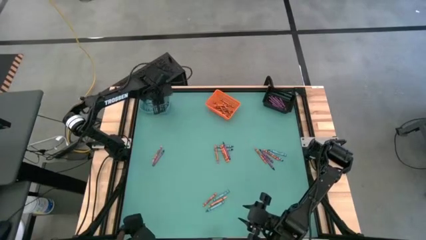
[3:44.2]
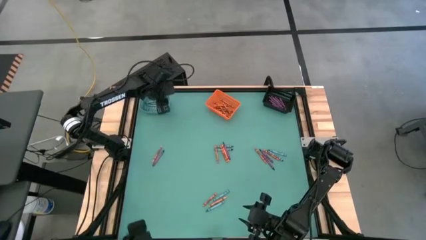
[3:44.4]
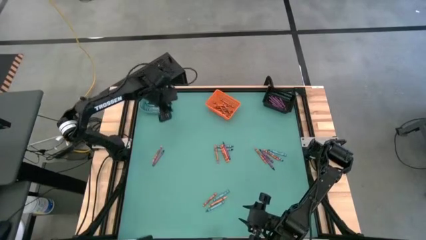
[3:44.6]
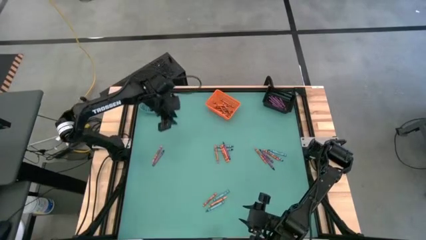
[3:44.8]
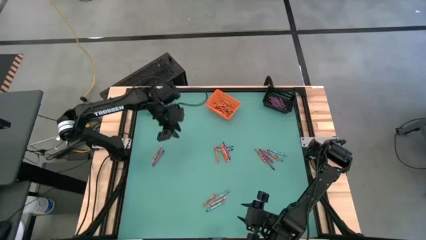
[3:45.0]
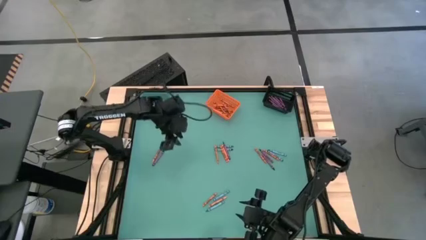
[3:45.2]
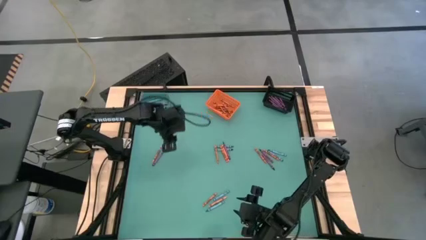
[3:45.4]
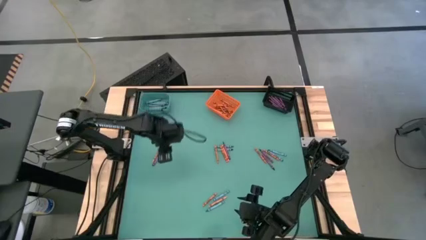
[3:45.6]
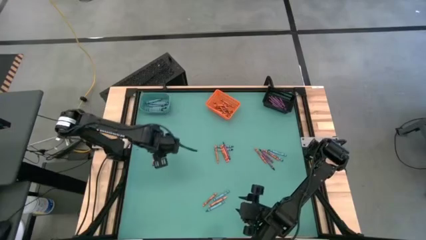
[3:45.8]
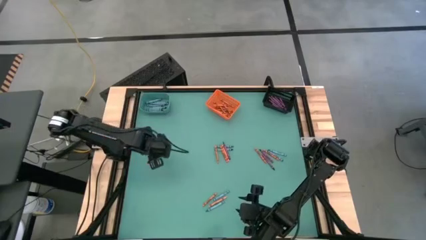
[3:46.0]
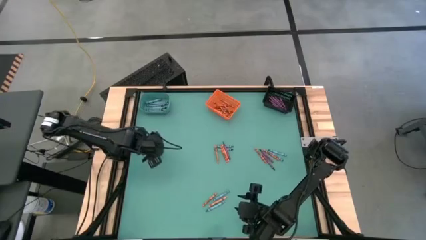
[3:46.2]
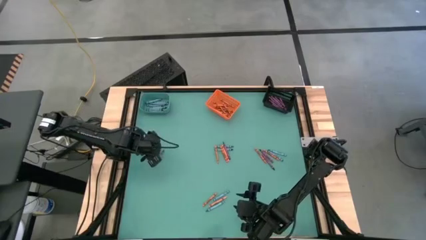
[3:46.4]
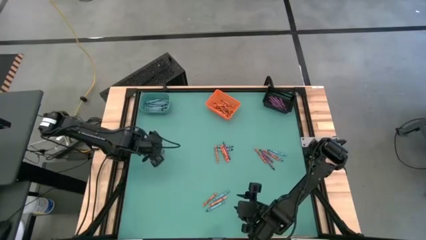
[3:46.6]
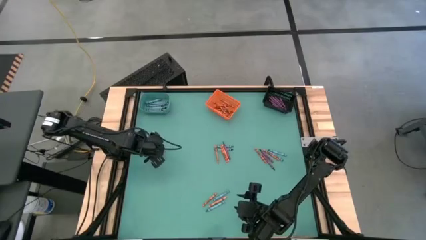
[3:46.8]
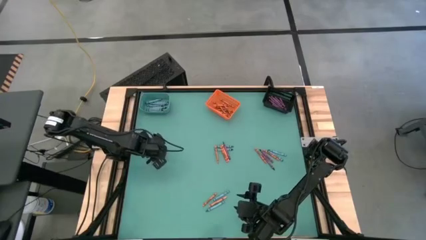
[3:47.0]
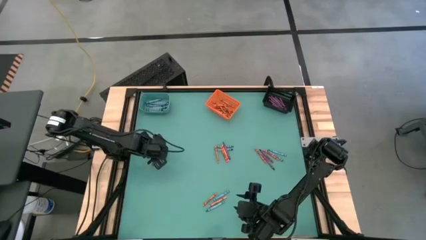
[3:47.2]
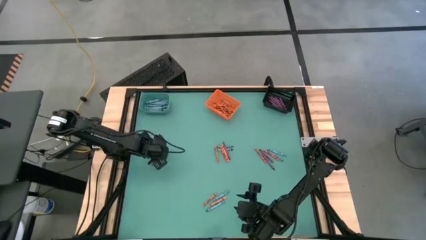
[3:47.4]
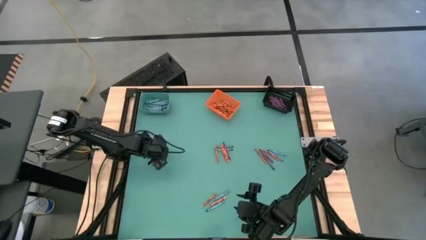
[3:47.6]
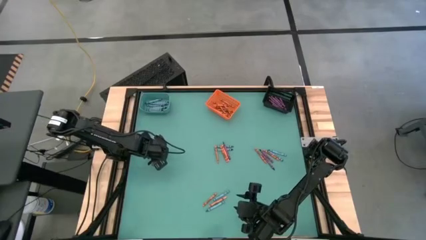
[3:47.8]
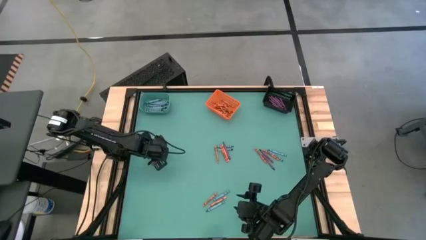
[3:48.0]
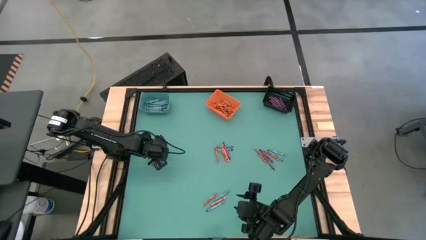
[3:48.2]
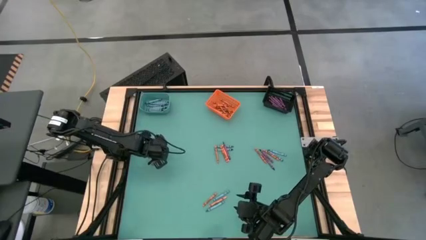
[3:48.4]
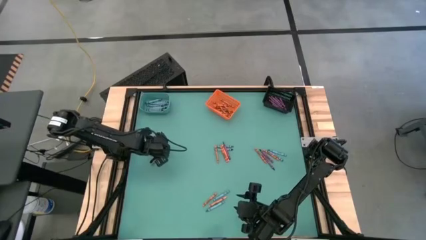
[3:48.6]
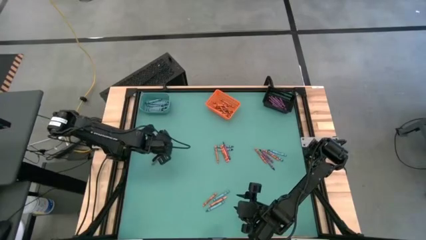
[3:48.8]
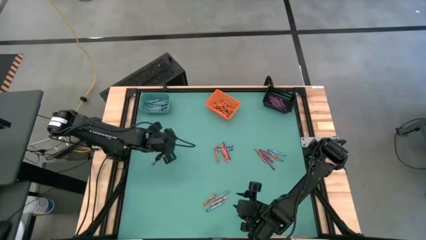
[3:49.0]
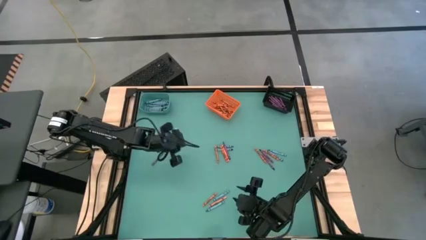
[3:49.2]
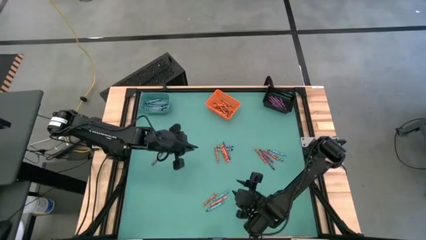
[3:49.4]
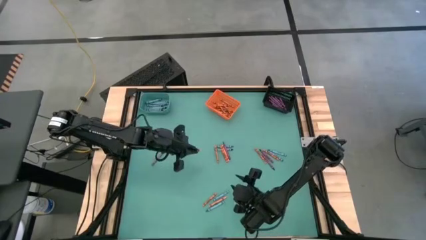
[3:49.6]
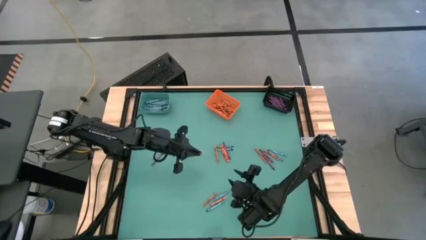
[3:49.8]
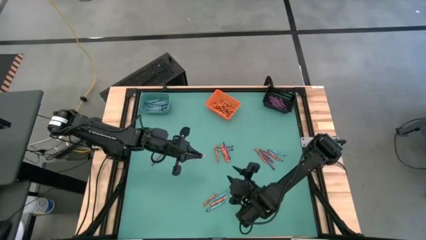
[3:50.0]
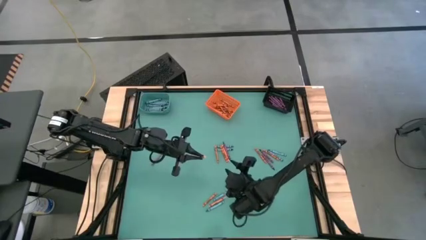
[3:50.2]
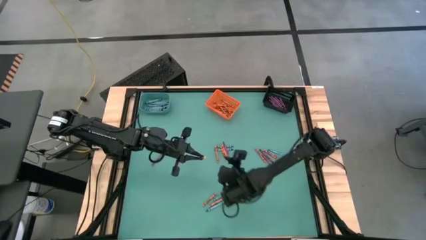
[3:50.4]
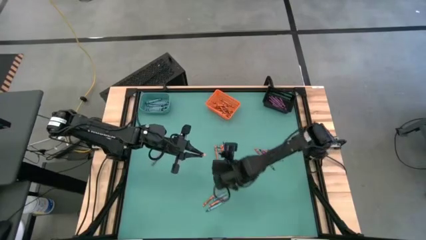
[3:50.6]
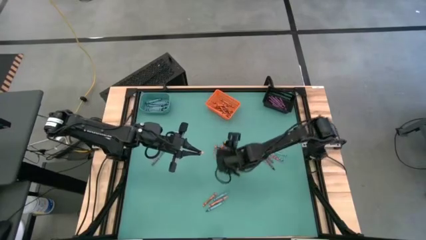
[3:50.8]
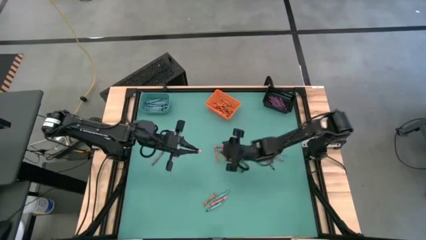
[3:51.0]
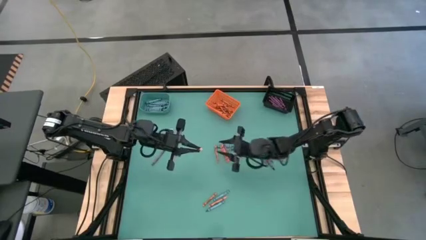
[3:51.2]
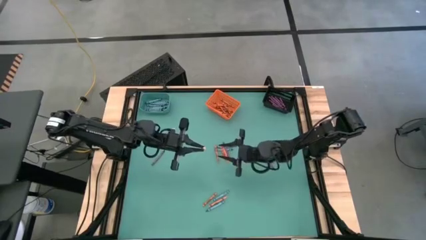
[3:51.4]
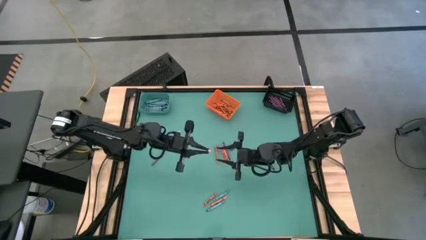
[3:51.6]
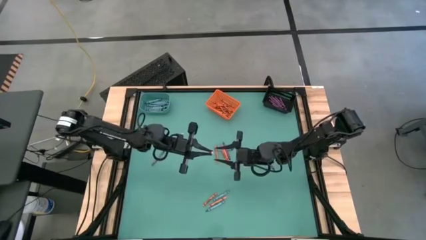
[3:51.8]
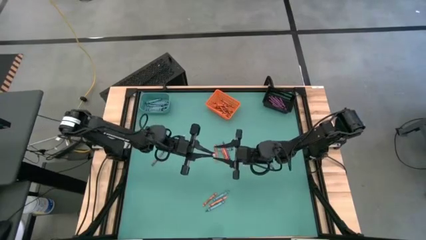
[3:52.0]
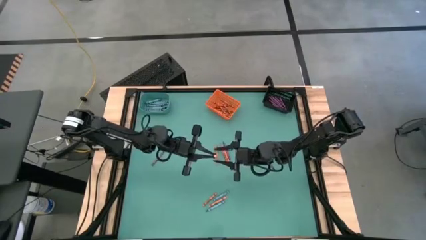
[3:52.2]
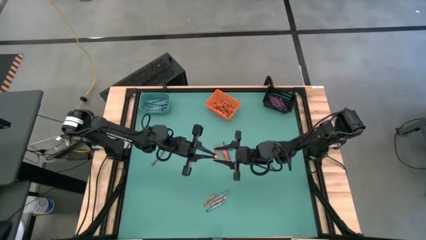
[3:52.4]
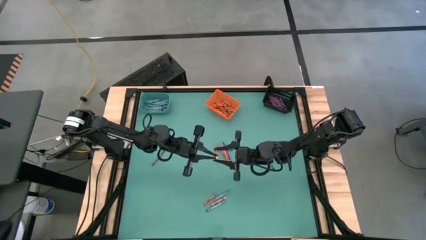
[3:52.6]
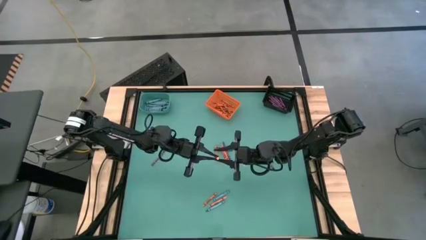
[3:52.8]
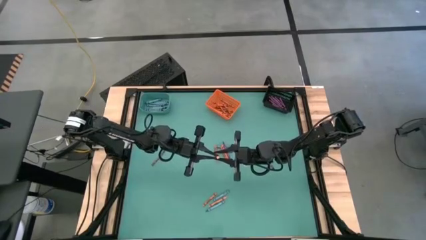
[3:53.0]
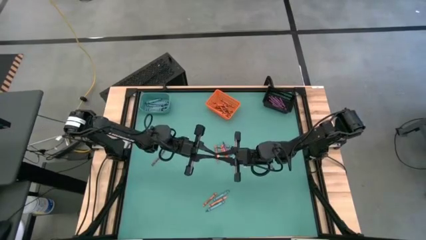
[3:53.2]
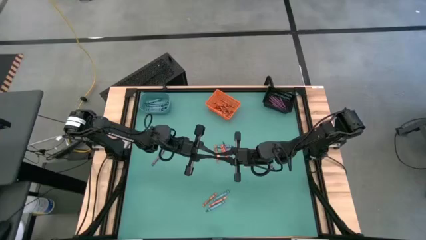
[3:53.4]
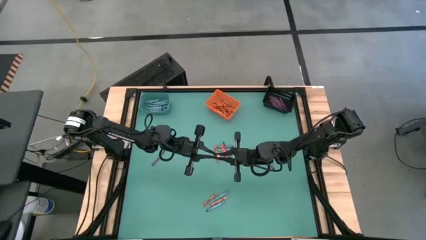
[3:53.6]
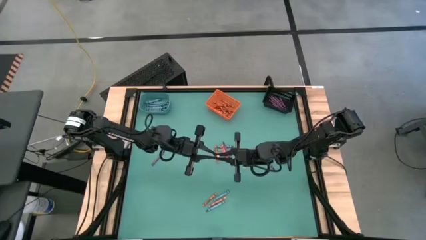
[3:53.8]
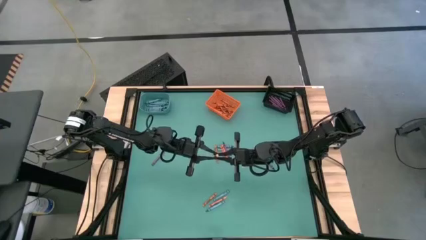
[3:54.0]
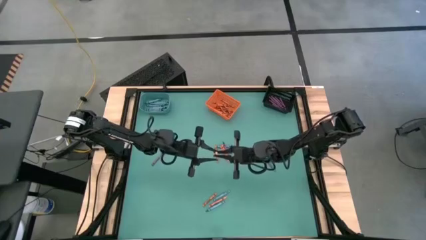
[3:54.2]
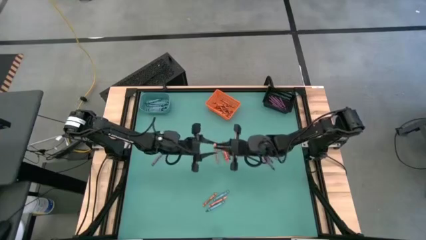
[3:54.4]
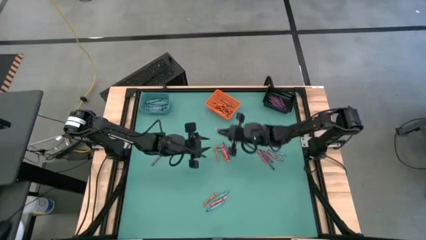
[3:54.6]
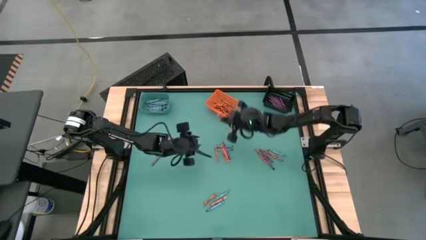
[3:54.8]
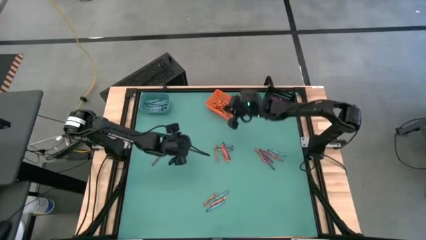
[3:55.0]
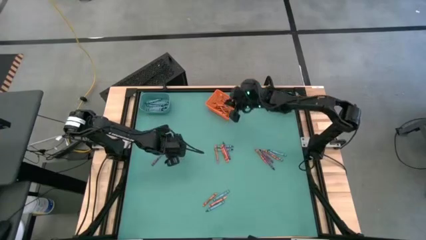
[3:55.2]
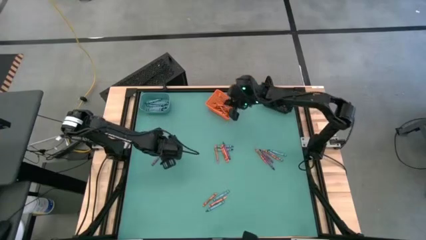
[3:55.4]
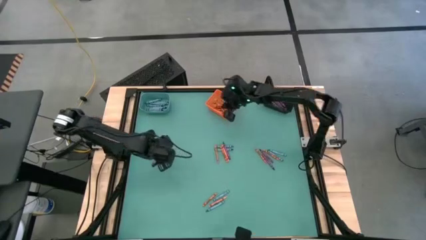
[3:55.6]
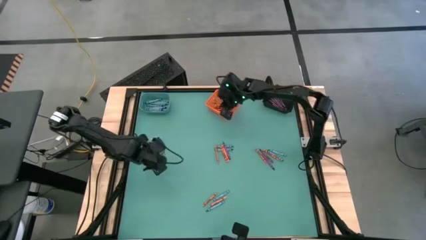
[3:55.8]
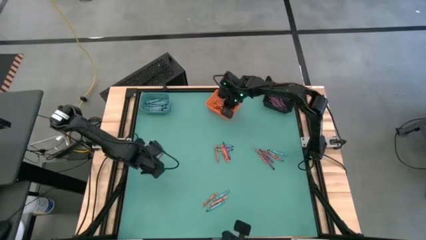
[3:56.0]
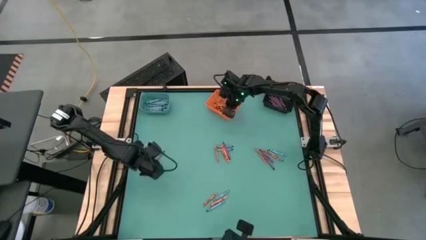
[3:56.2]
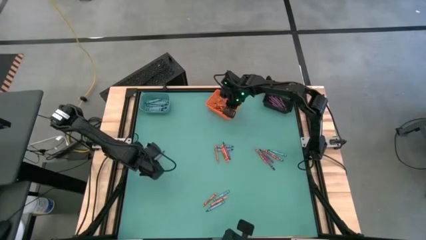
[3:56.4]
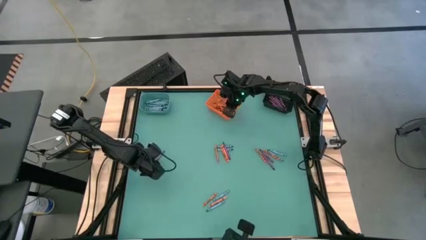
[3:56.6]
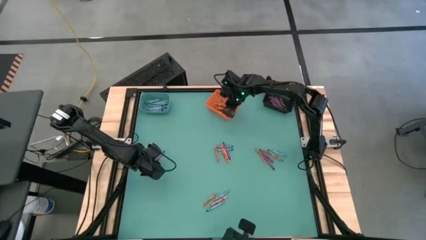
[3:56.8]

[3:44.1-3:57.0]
Task: Sort crayons
Put the orange crayon into the orange bin

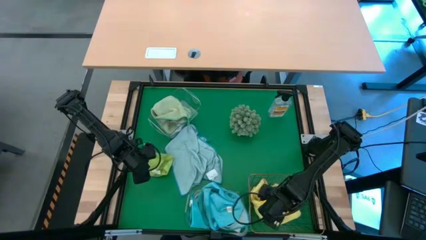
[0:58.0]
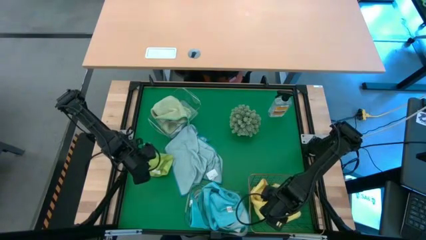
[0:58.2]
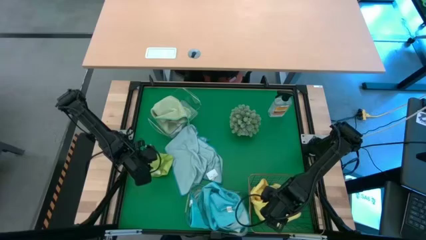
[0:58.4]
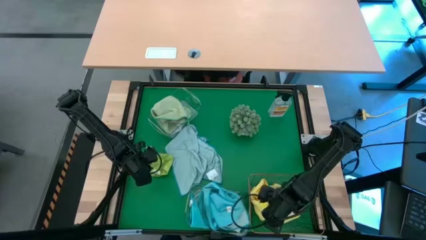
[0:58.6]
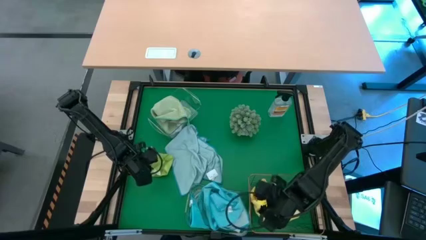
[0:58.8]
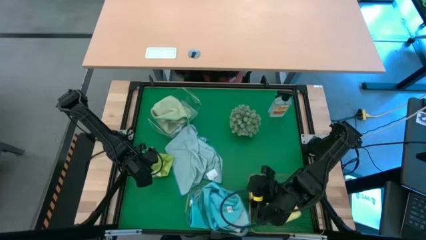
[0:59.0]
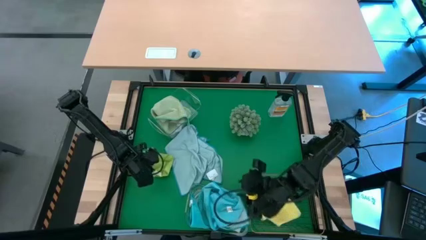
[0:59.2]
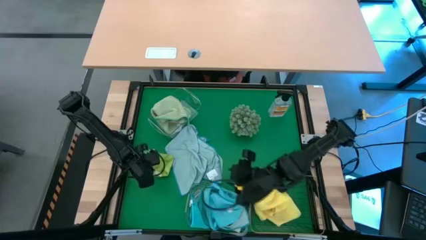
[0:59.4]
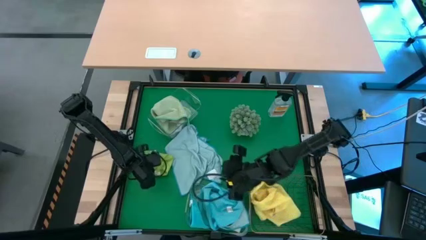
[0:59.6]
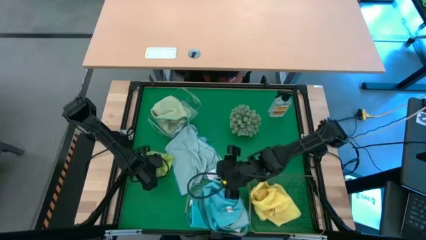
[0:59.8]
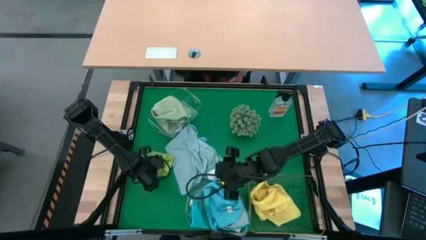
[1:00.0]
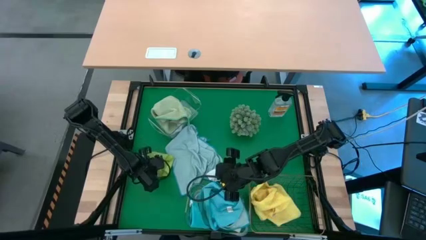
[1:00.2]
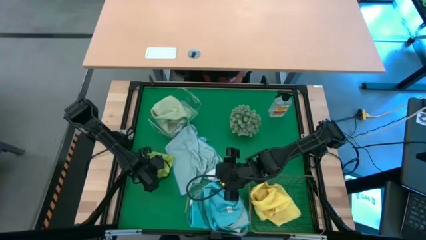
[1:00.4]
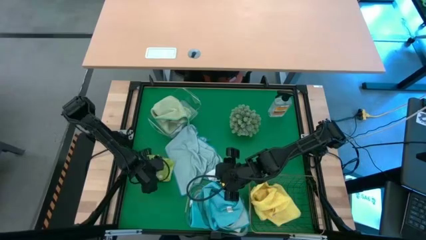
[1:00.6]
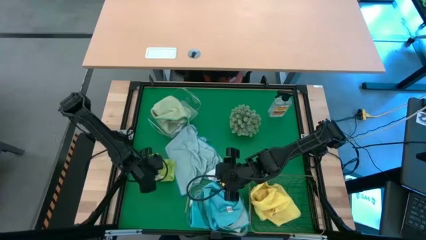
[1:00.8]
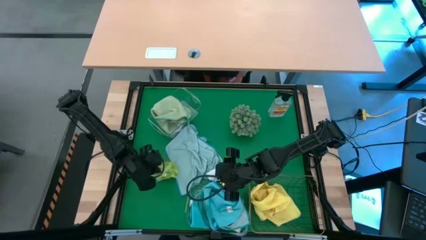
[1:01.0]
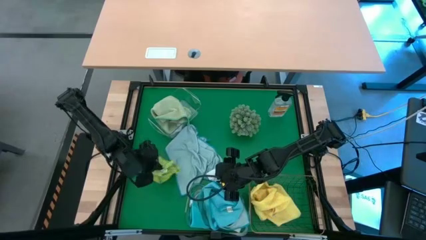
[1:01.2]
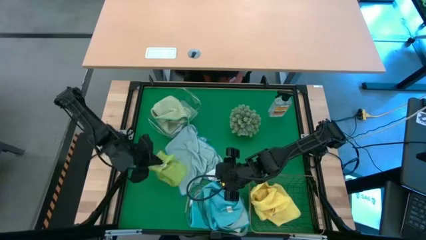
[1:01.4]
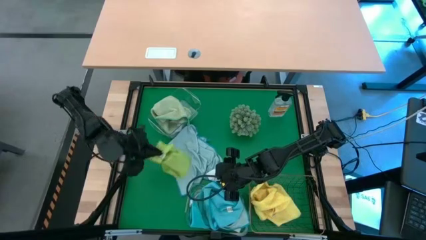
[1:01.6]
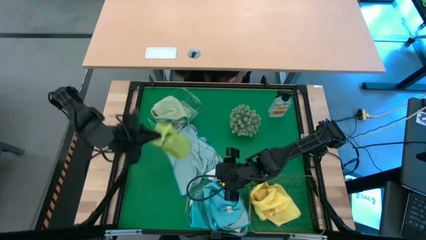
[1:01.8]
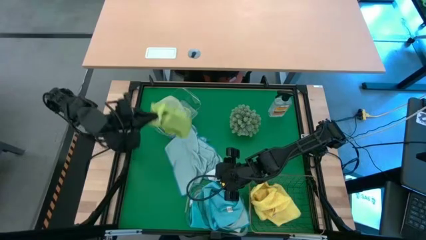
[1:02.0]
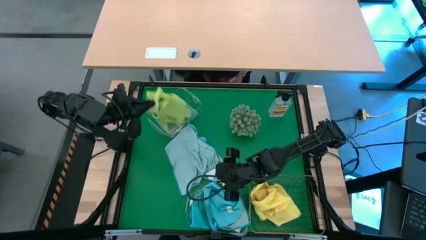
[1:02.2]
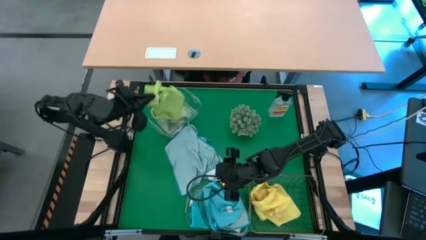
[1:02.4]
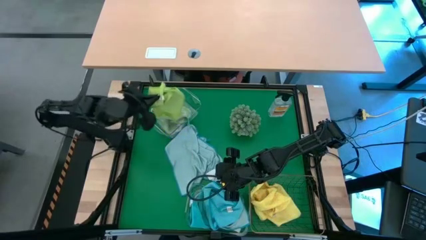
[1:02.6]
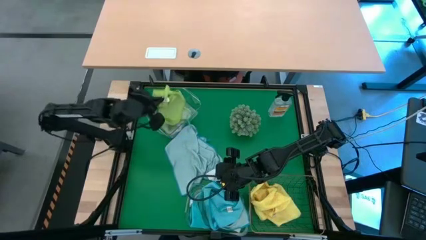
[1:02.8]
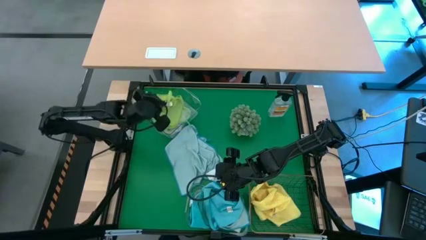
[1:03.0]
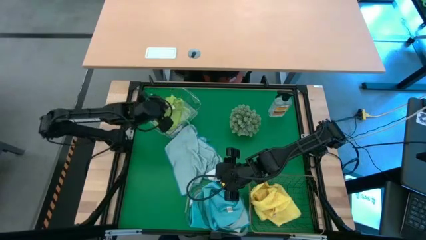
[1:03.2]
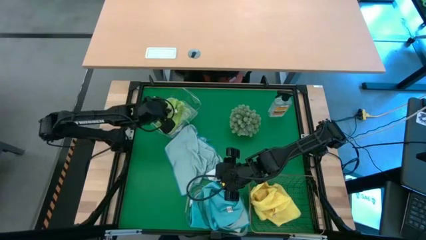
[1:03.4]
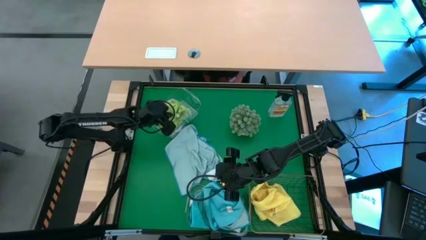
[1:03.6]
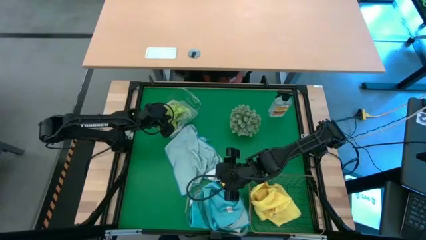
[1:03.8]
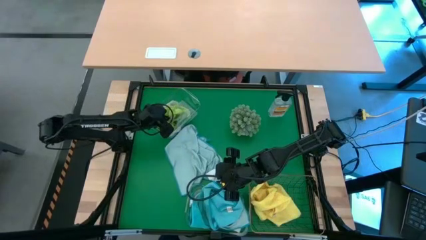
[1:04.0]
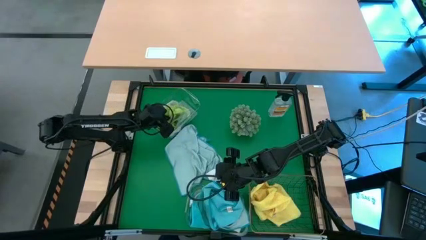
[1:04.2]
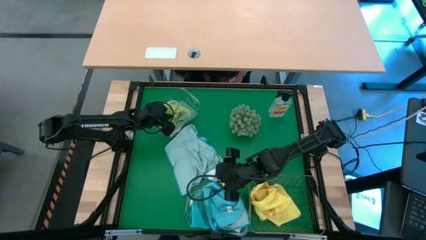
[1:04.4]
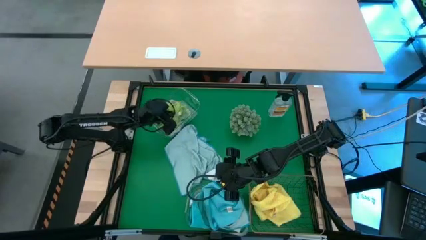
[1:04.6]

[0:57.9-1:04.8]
Task: Sort microfiber towel by color & place in baskets
Put the green microfiber cloth into the top transparent bin
